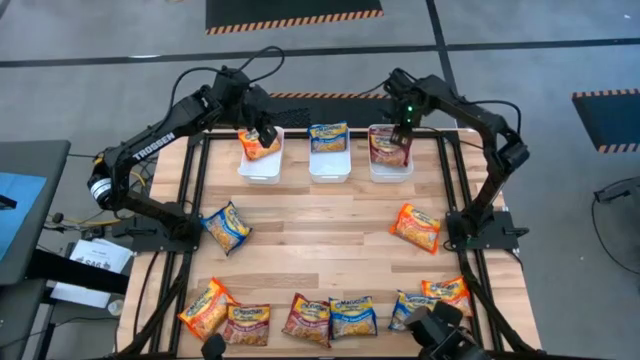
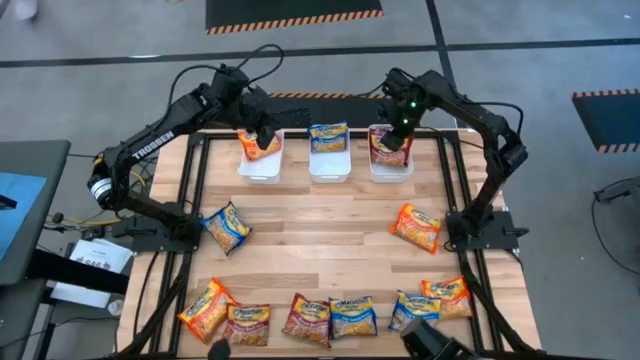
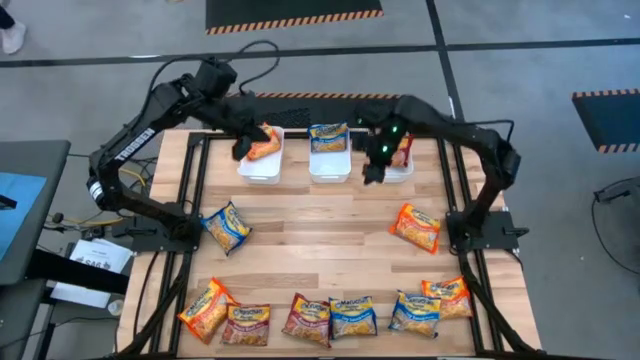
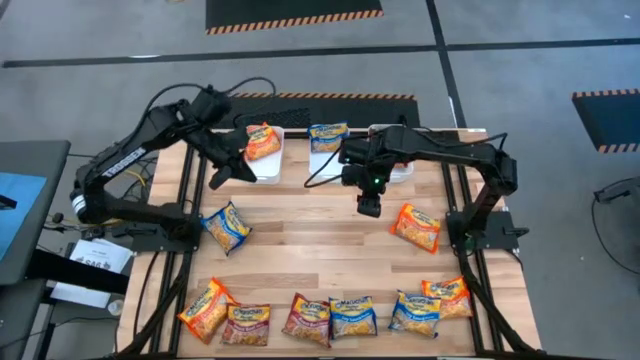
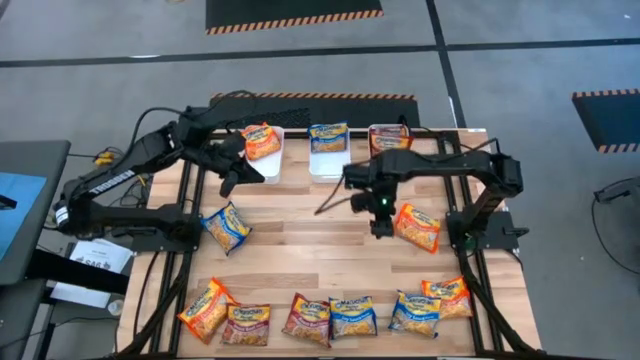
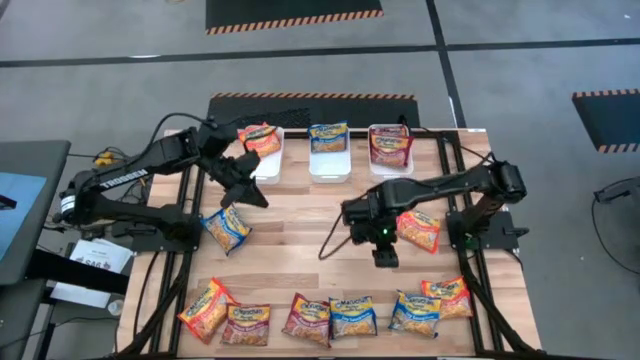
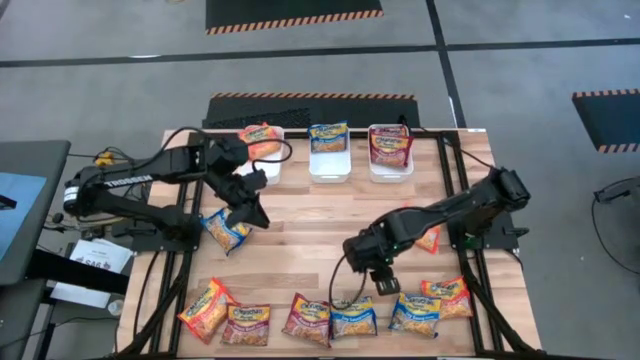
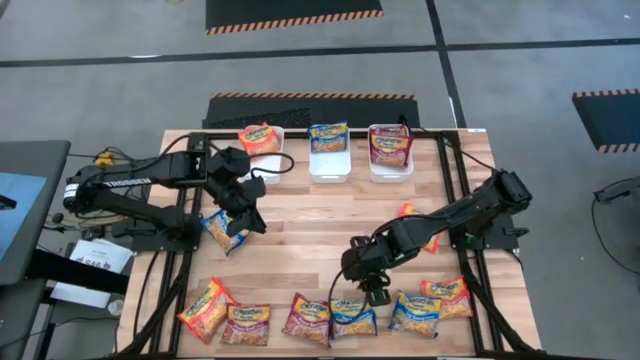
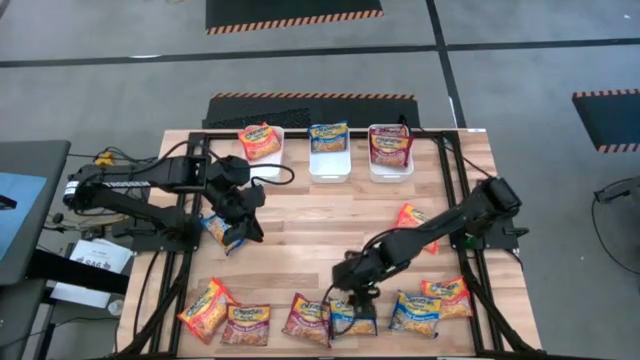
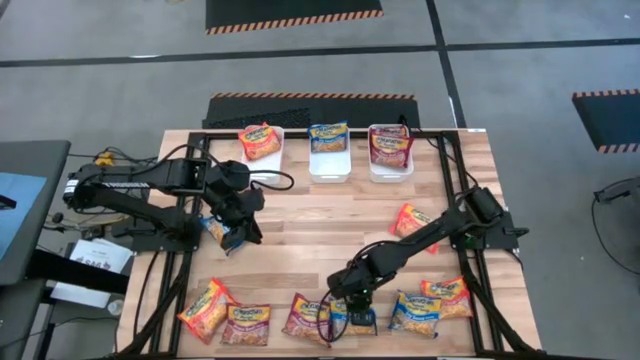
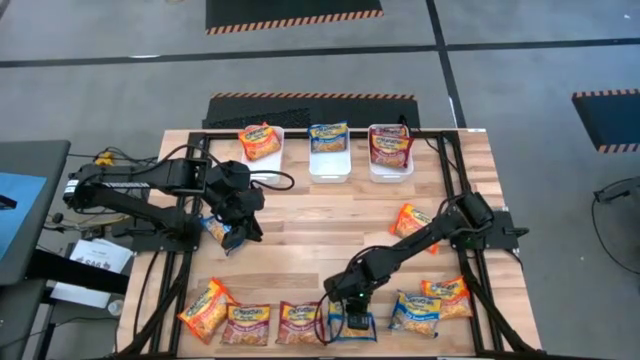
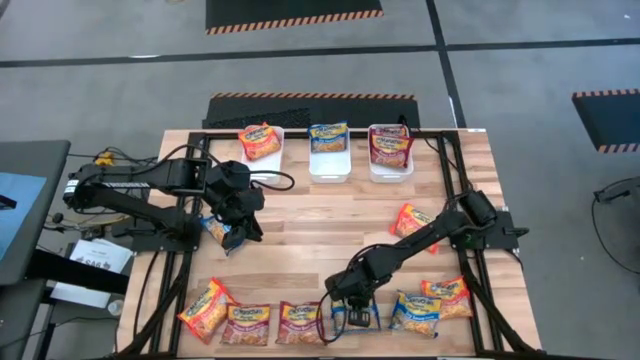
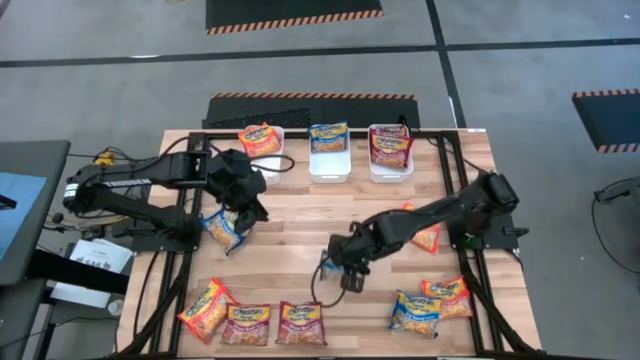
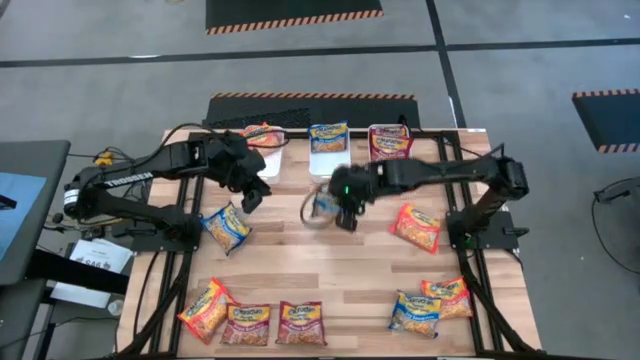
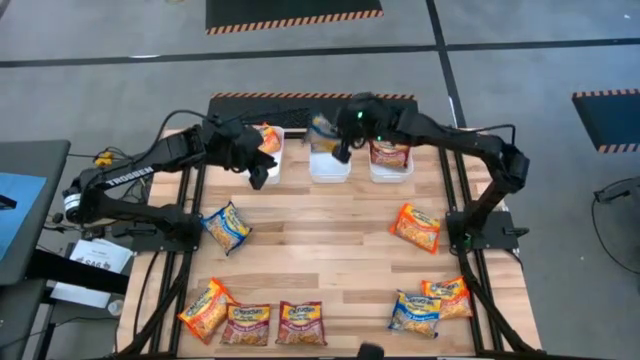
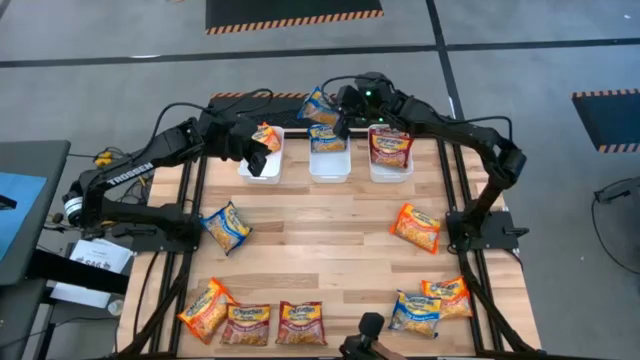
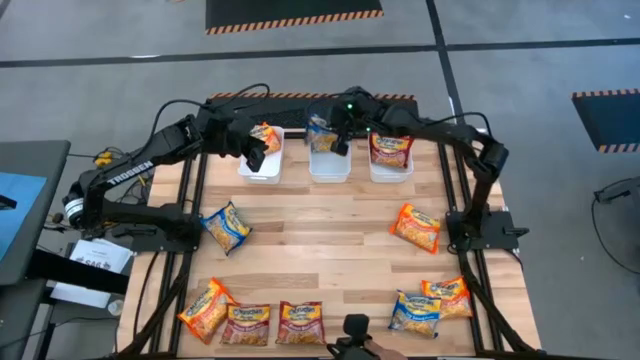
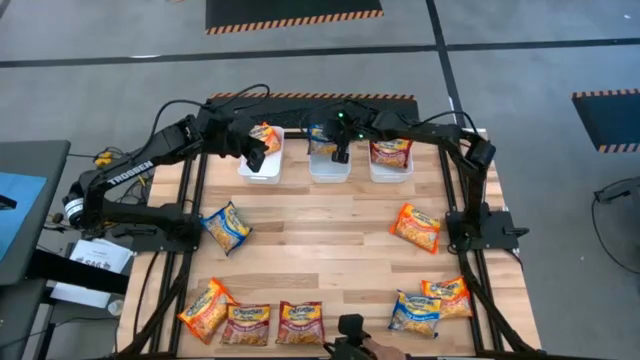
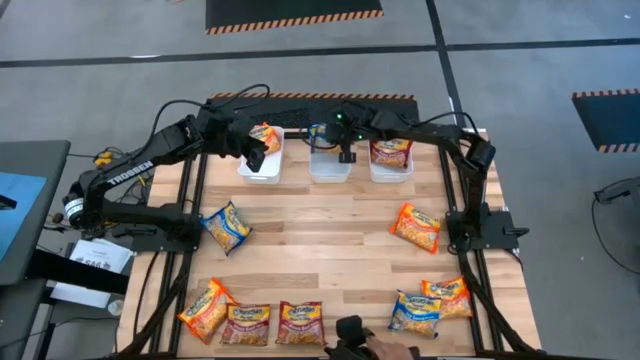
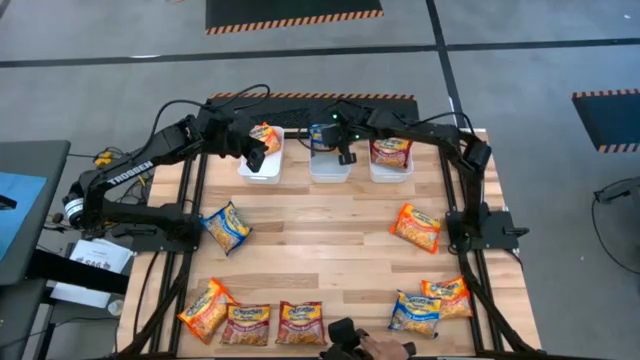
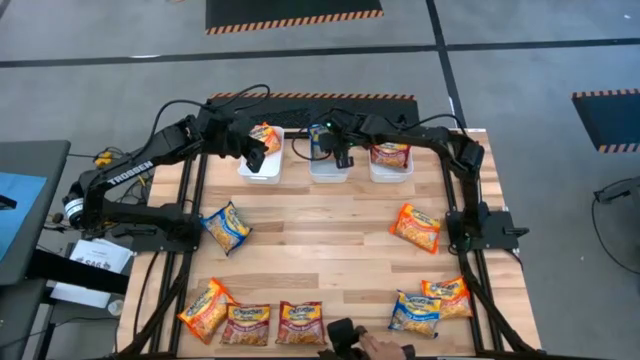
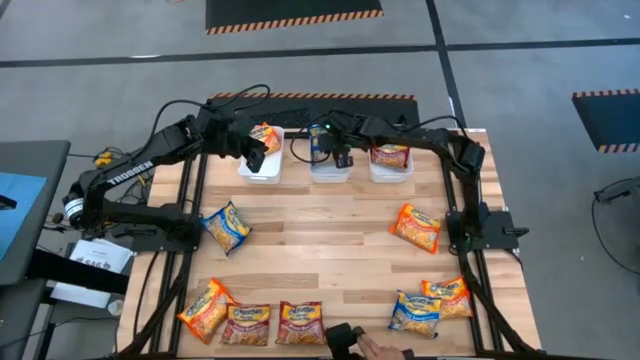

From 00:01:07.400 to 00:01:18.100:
Task: Sort Maruchan noodles
Put the blue noodle pack into the middle white bin

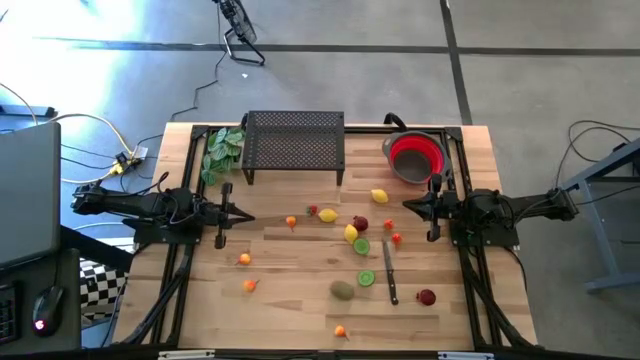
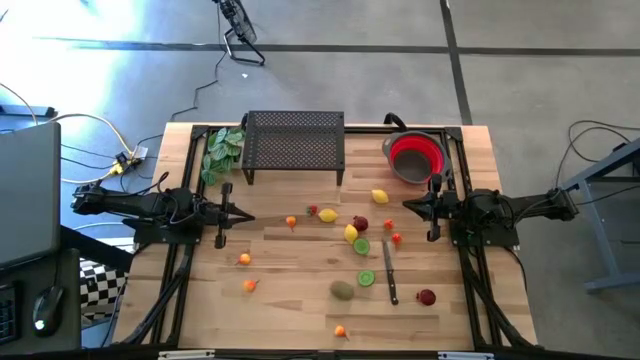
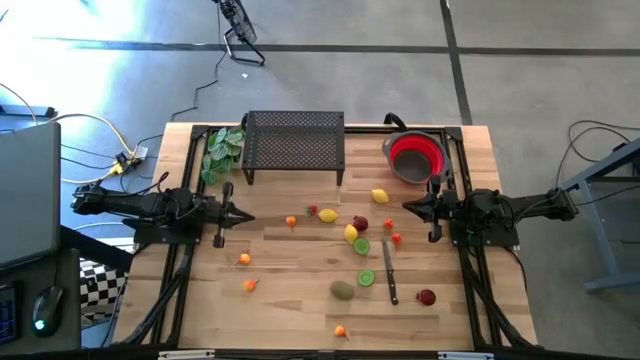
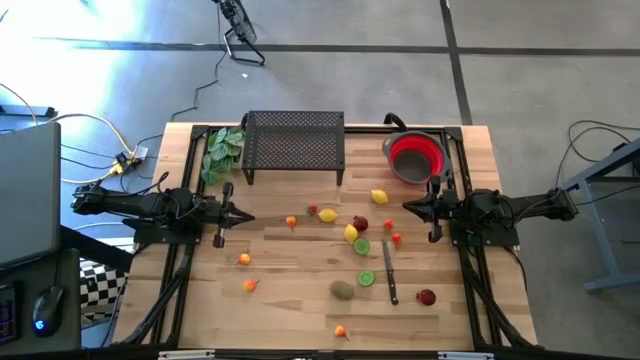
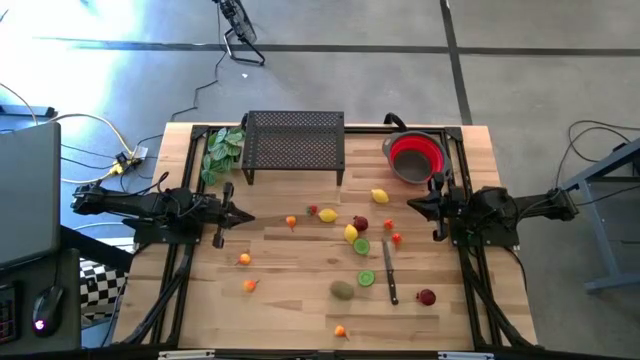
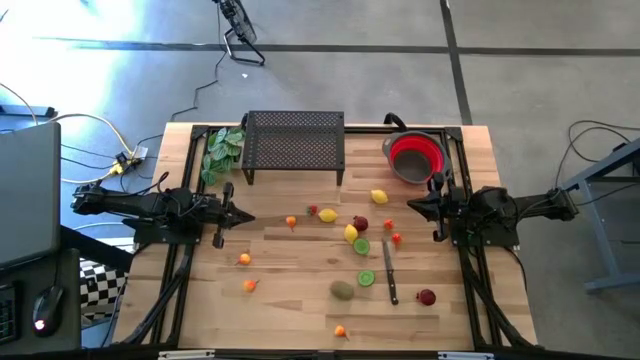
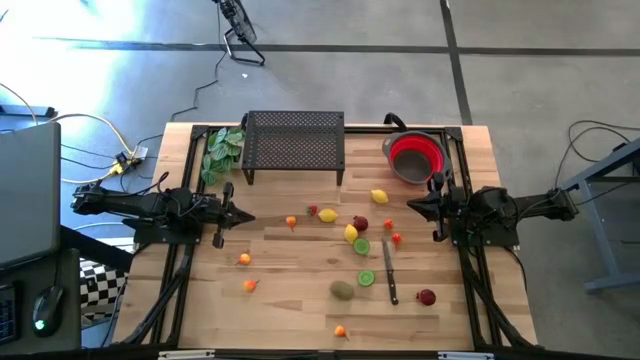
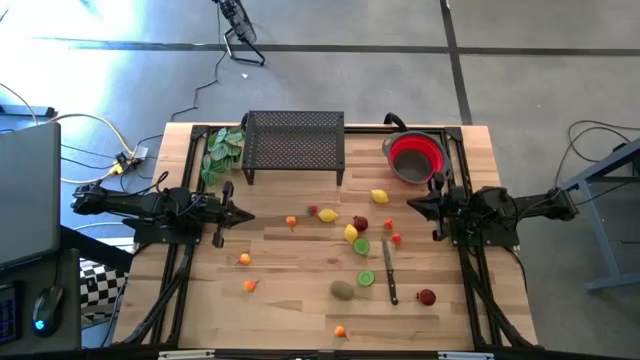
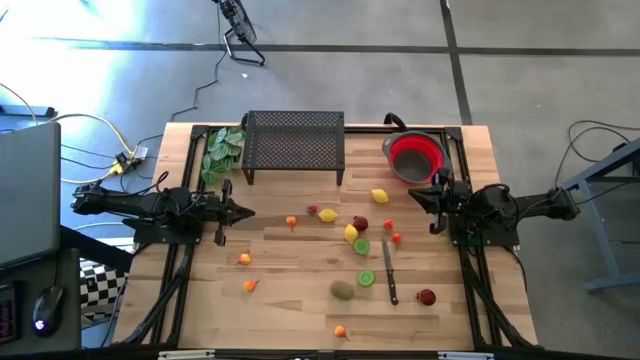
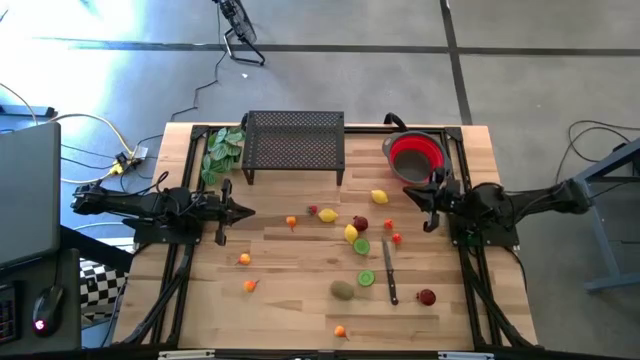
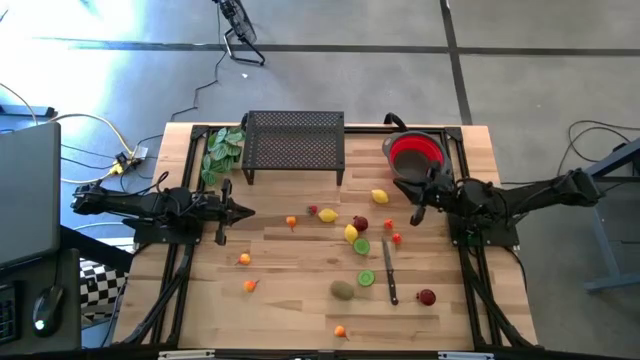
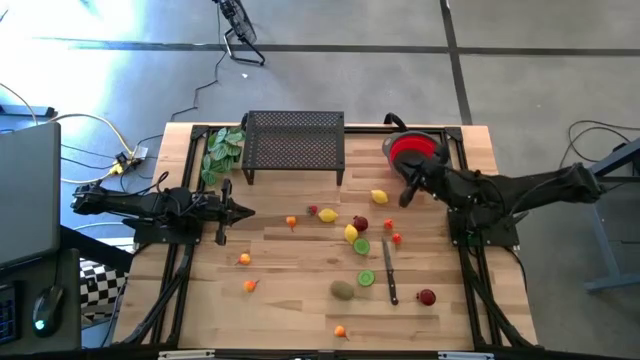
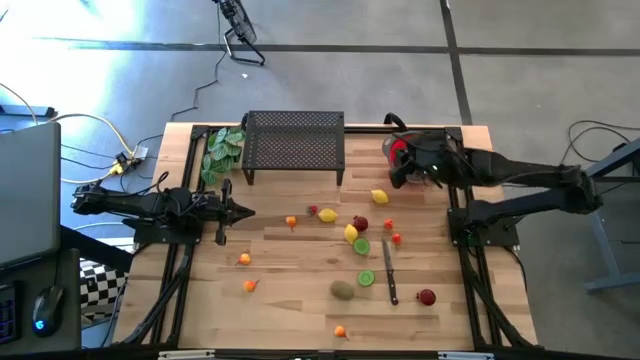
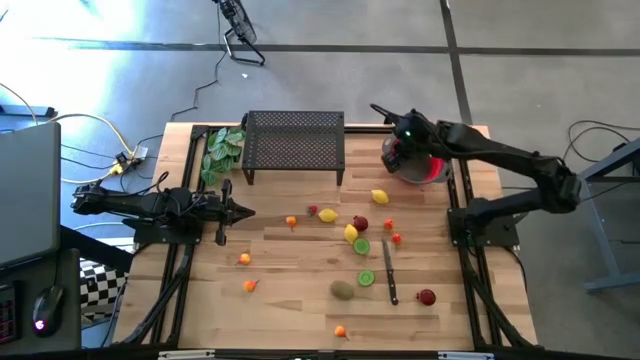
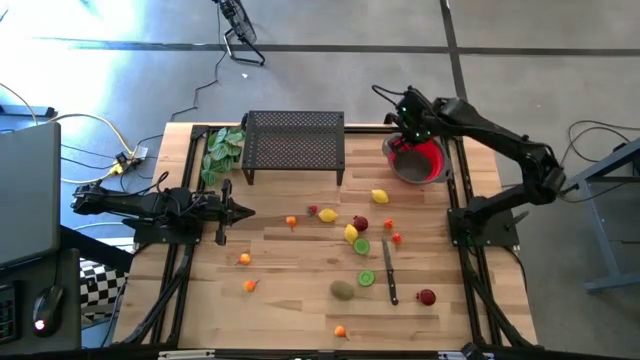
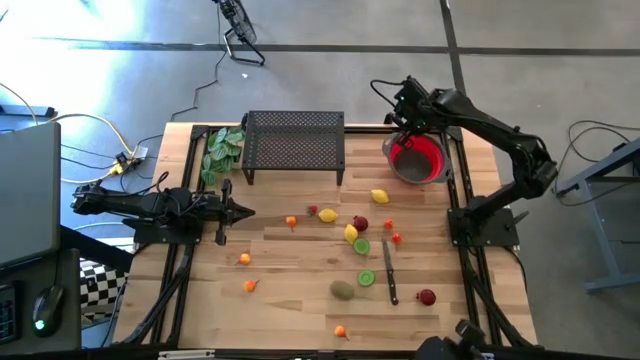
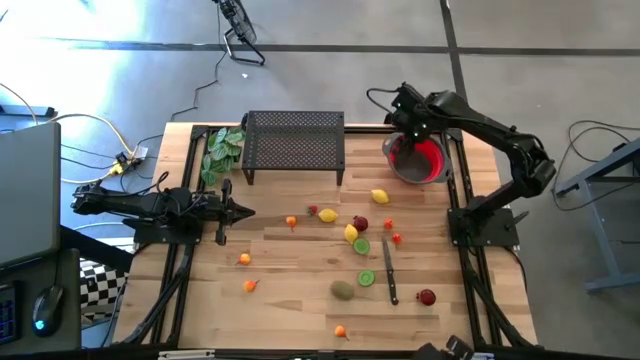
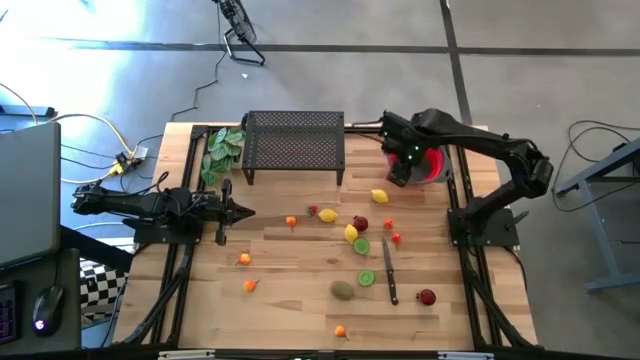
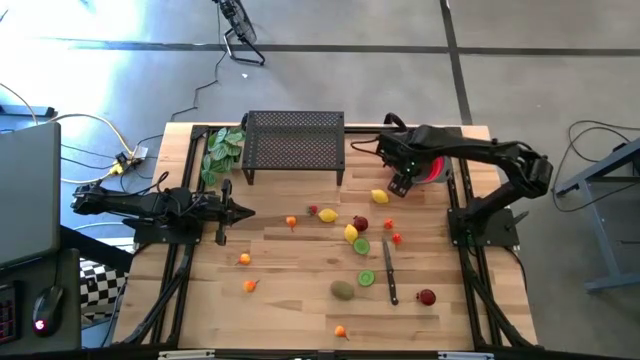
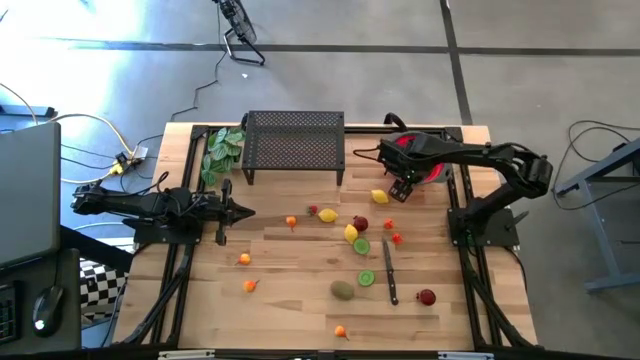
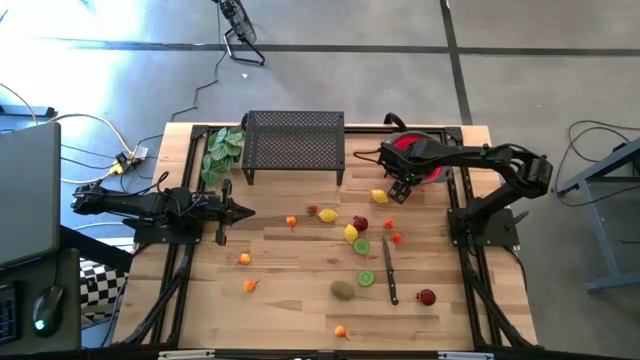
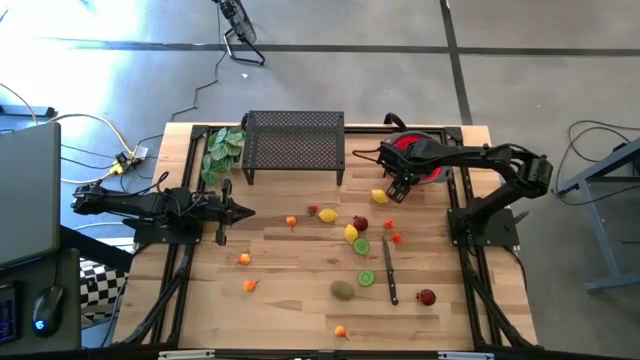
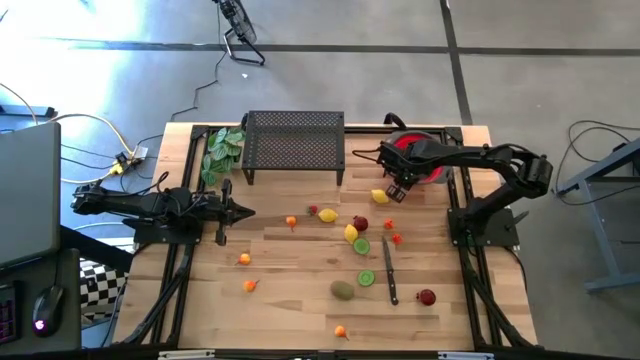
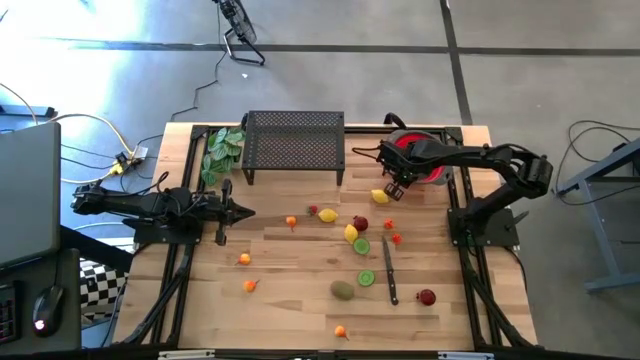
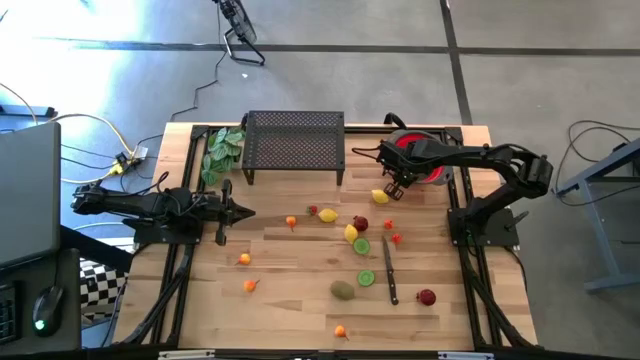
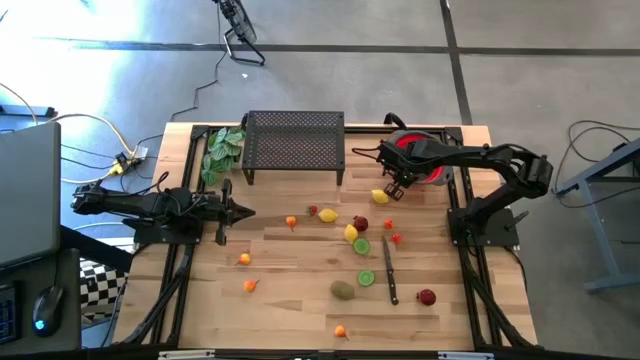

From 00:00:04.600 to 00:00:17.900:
Task: Pick & Place Fruit
Put the red strainer bowl on the shelf
